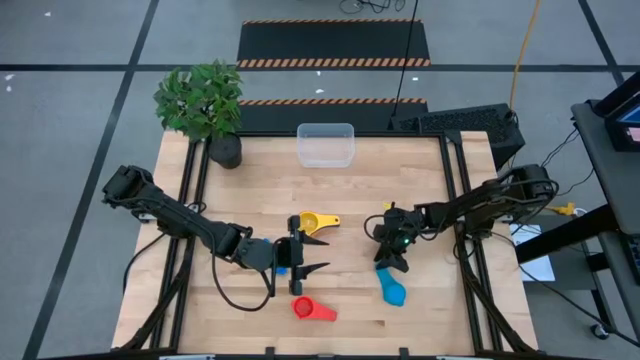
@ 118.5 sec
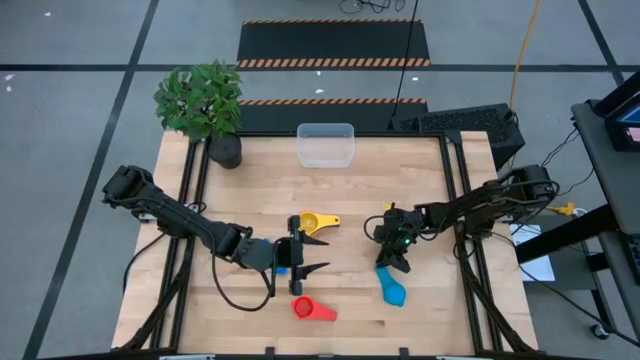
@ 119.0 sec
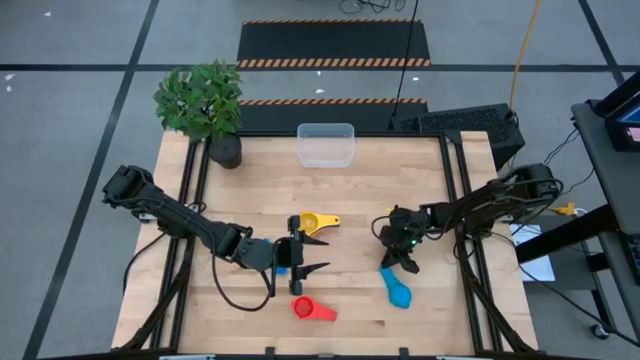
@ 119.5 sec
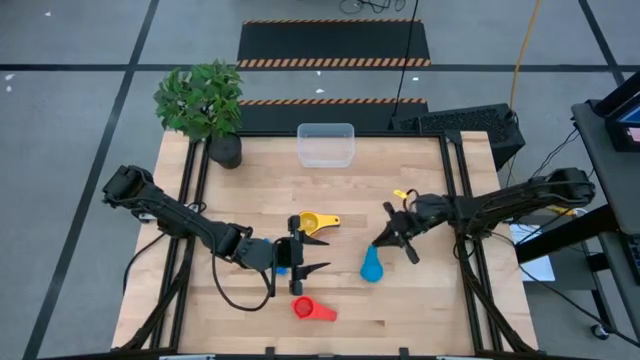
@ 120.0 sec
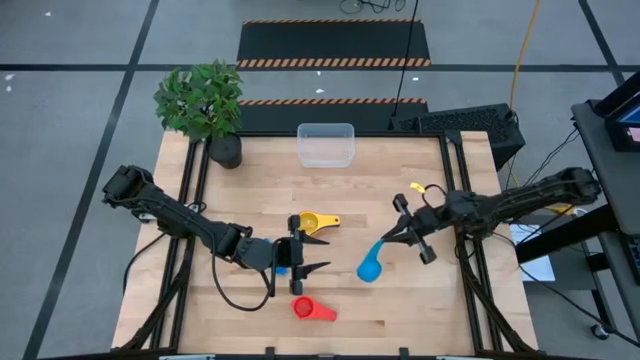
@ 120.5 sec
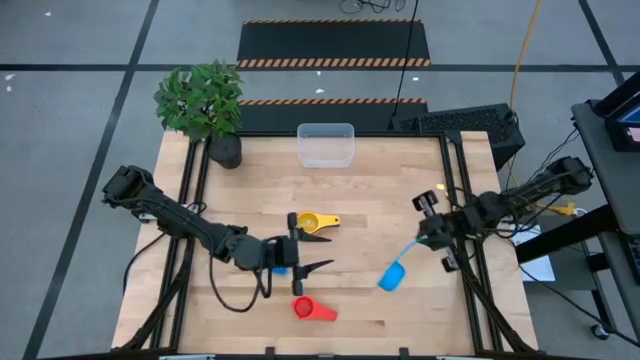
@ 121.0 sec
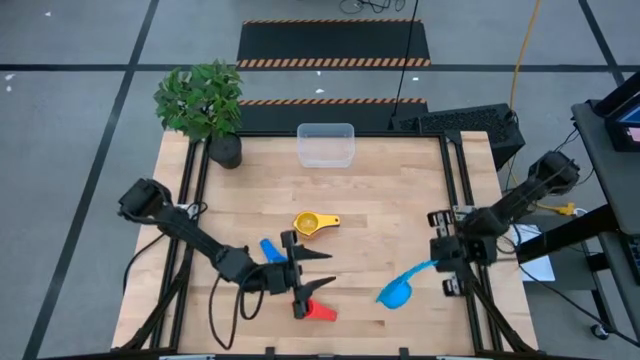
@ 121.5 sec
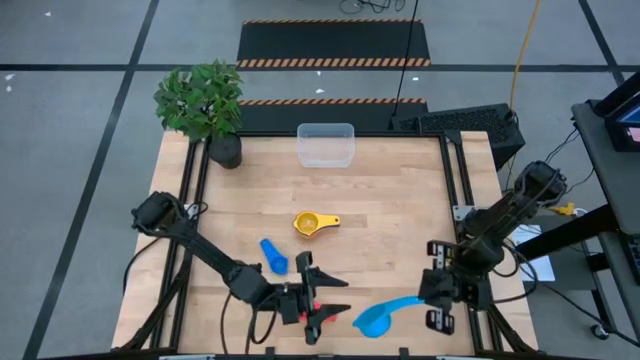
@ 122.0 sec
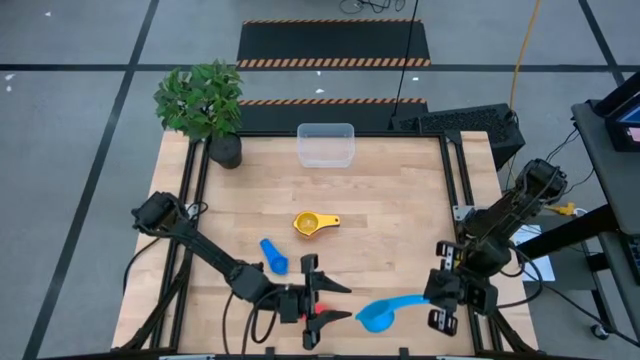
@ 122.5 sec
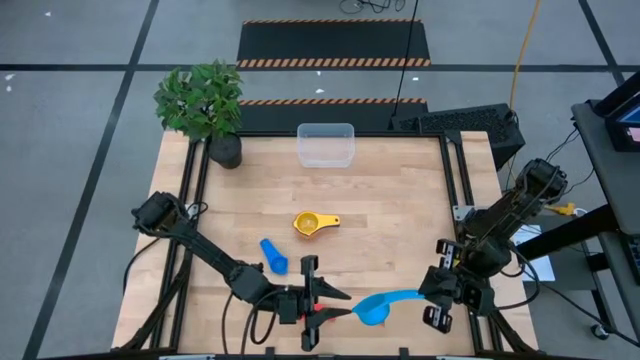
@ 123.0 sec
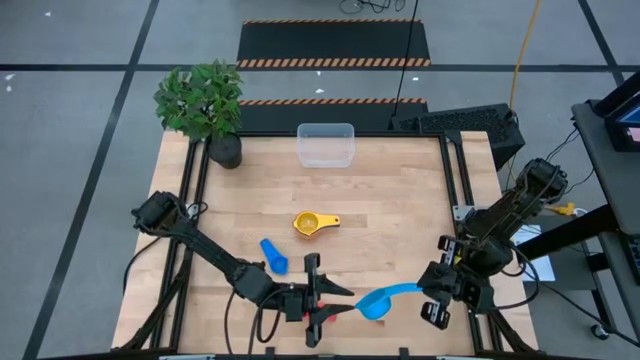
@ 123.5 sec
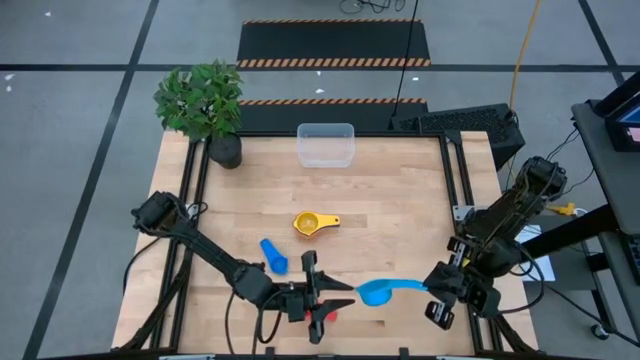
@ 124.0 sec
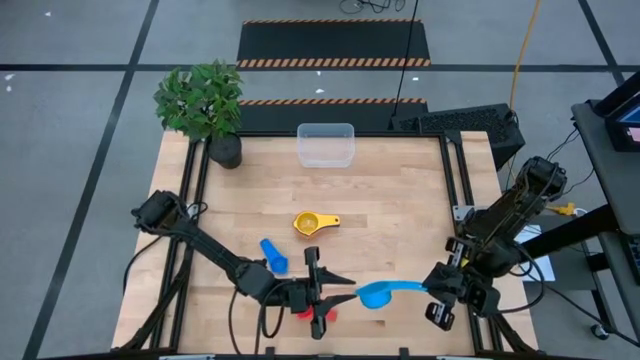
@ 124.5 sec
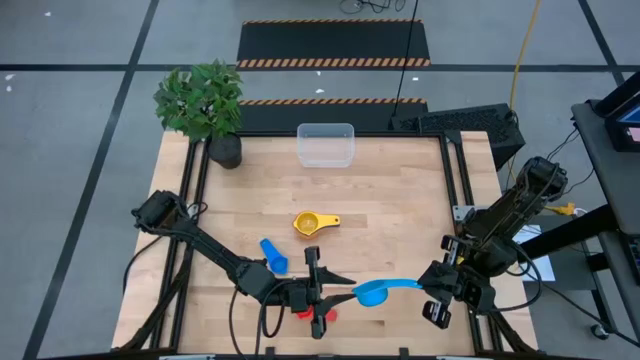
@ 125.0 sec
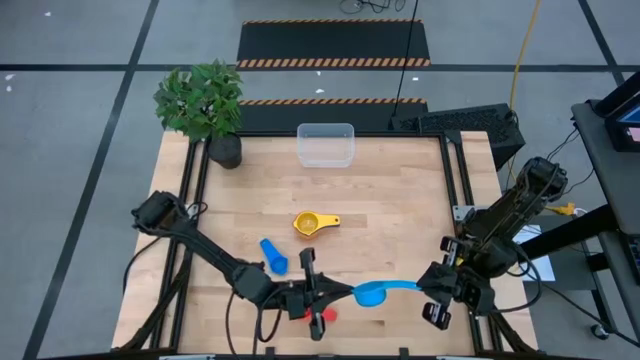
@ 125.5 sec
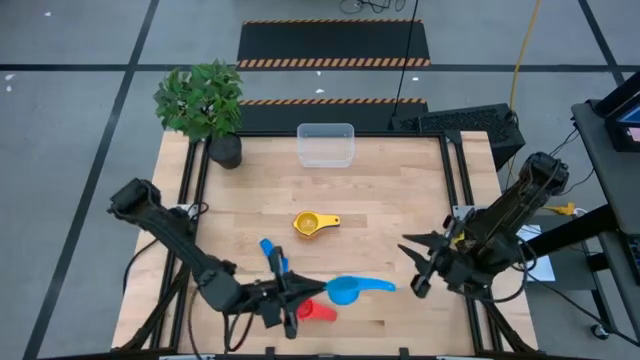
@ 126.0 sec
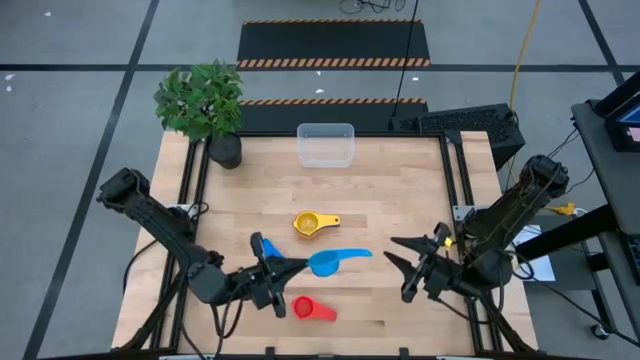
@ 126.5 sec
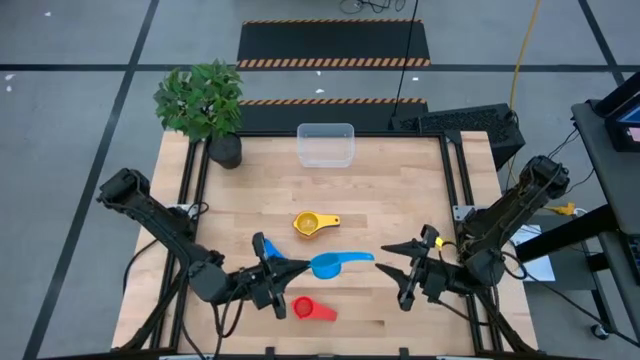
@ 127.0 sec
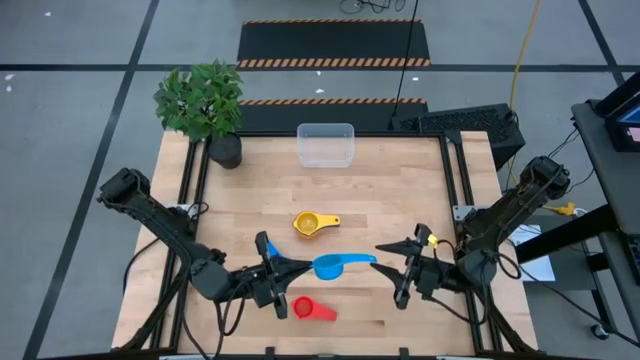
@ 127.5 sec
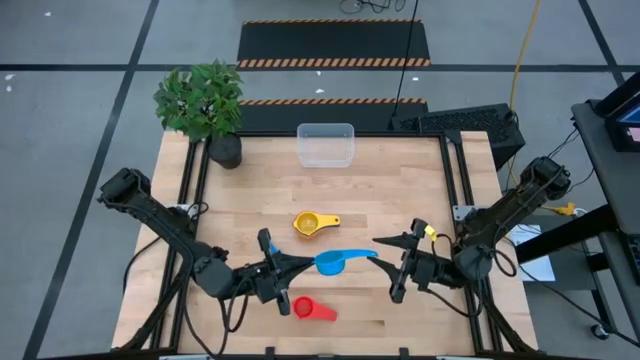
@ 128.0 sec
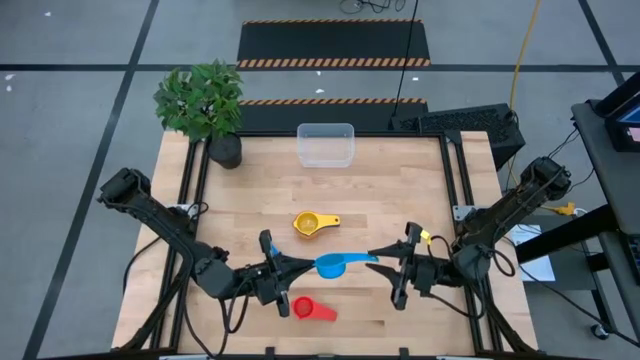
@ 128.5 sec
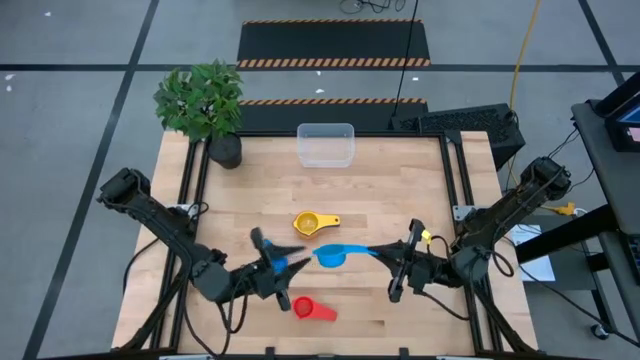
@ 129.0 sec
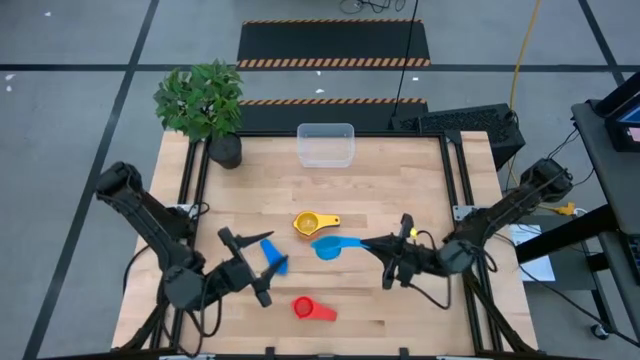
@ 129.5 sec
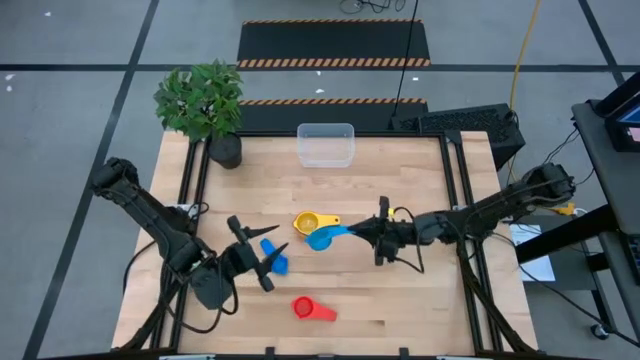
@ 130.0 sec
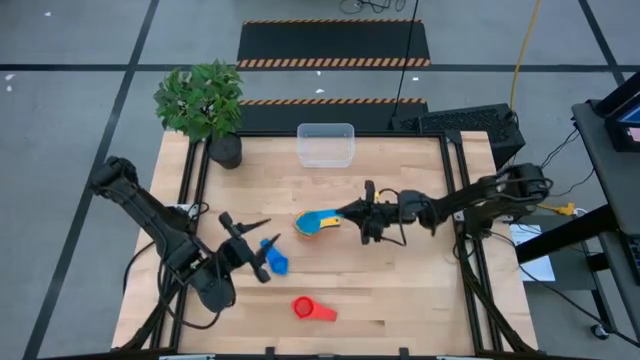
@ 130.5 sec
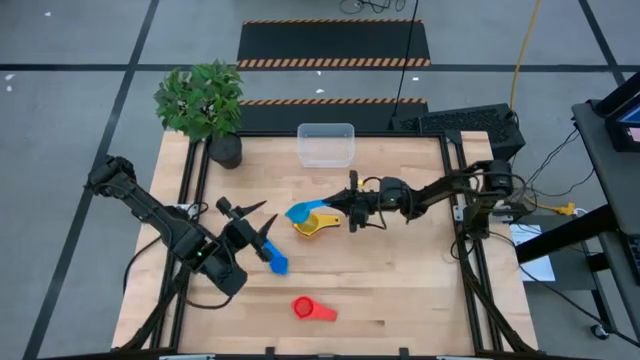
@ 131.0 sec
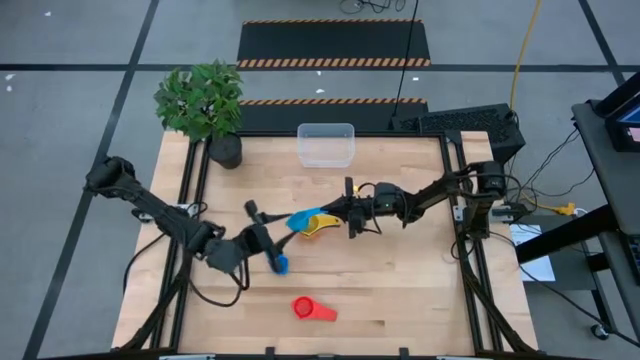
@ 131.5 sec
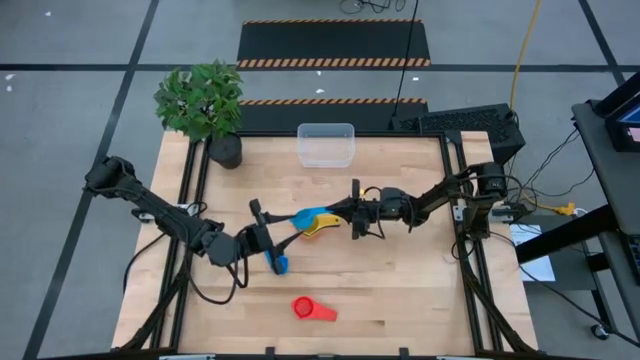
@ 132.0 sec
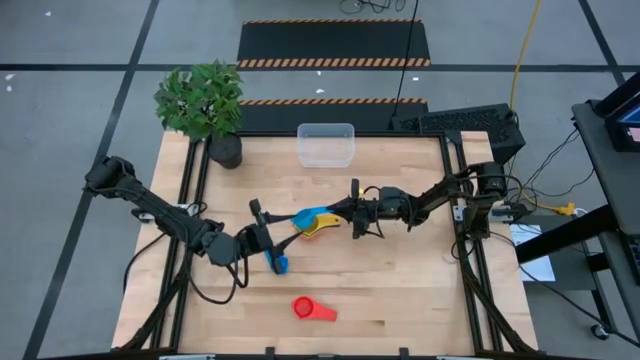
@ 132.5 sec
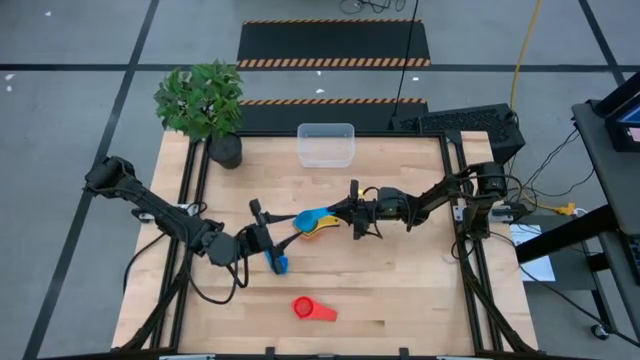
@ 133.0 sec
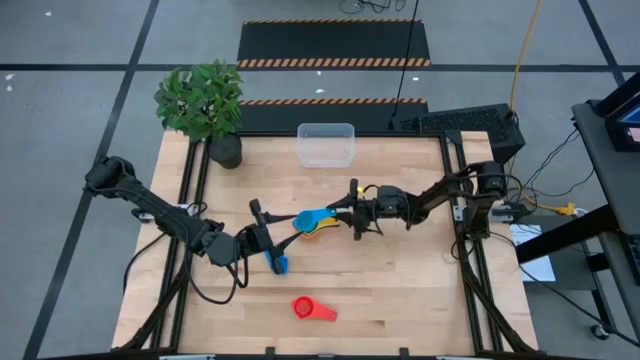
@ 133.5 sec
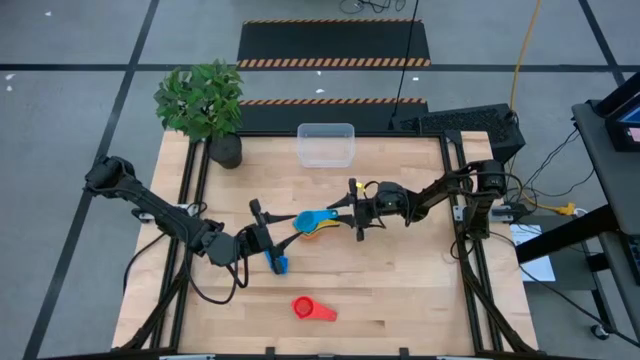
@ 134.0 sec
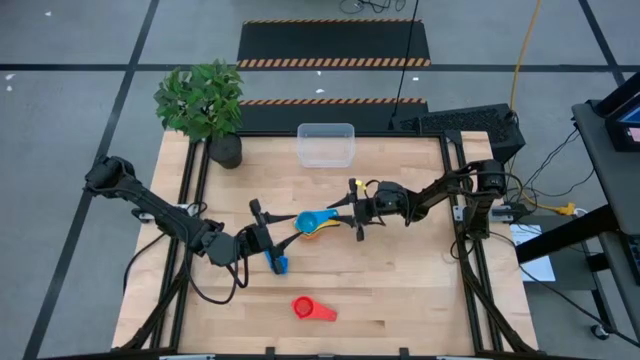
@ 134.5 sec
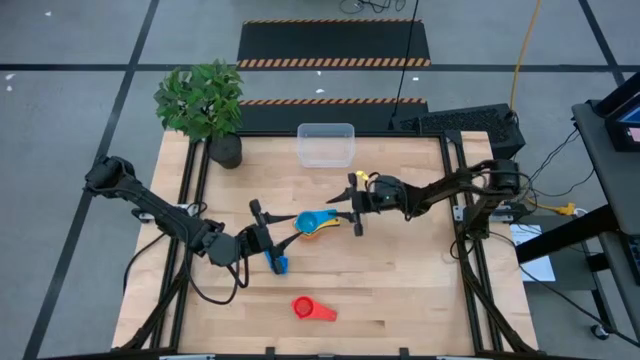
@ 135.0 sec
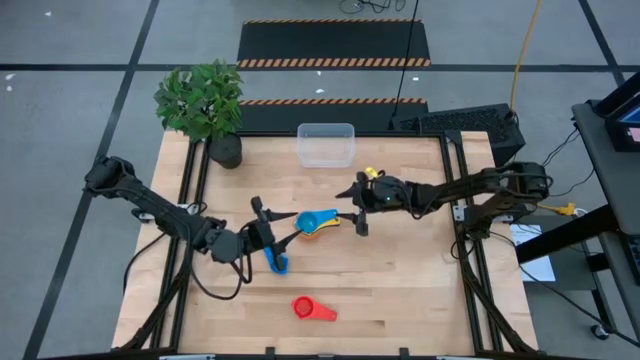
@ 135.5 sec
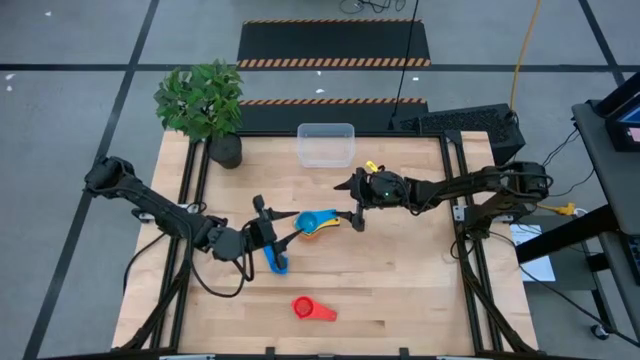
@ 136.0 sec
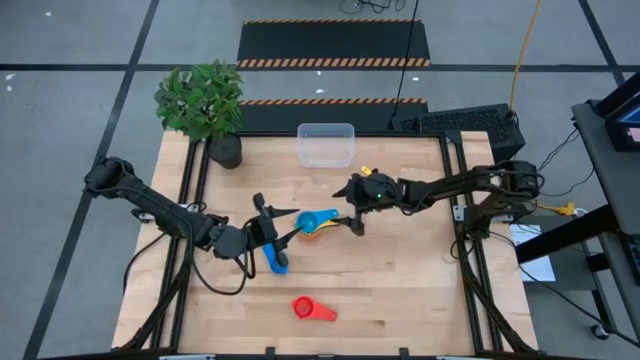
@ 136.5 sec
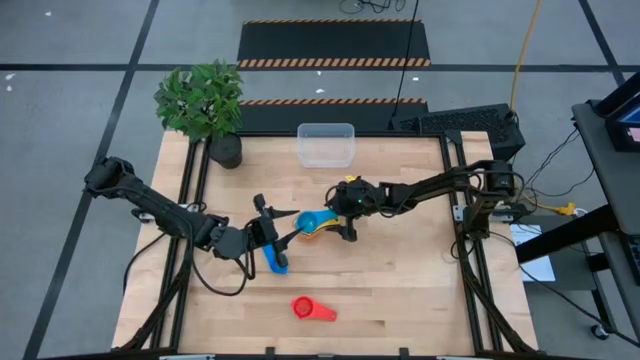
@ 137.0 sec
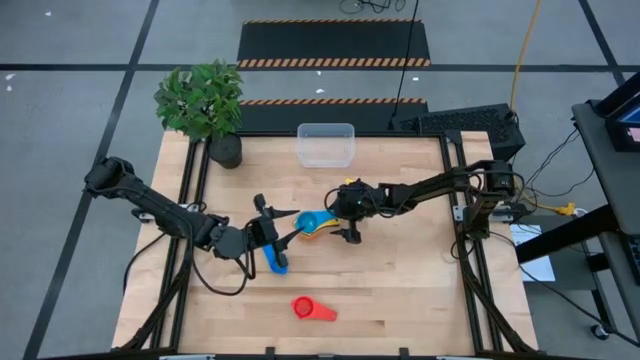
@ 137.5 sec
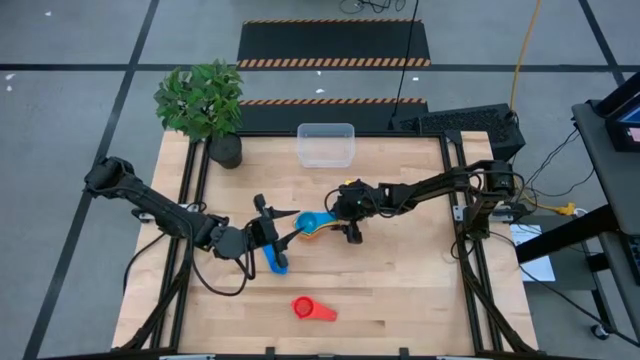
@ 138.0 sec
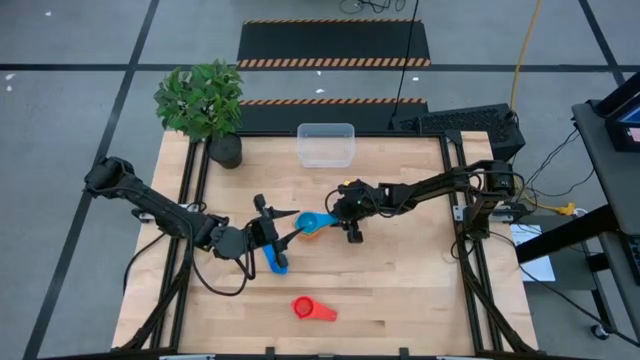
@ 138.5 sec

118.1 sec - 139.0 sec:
Task: Nest measuring cups in basket
Stack the light blue measuring cup on top of the yellow measuring cup
